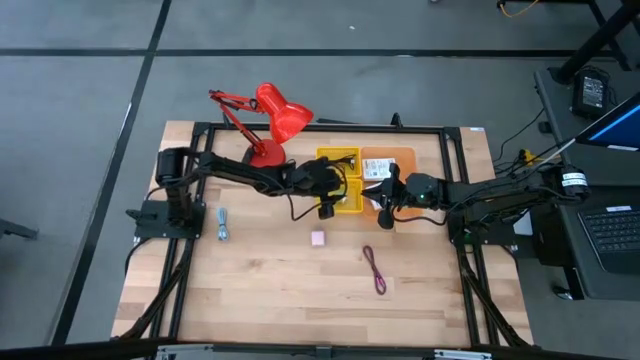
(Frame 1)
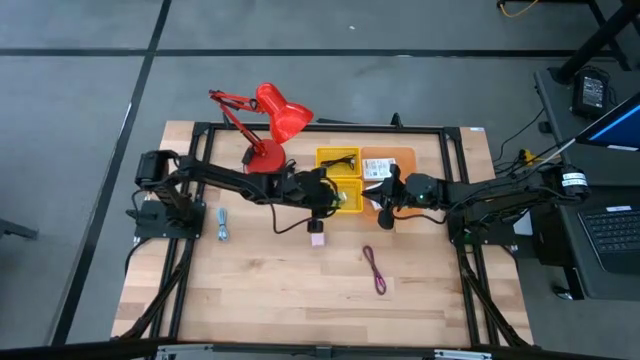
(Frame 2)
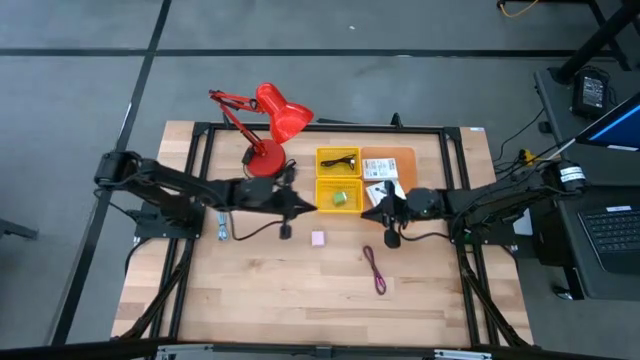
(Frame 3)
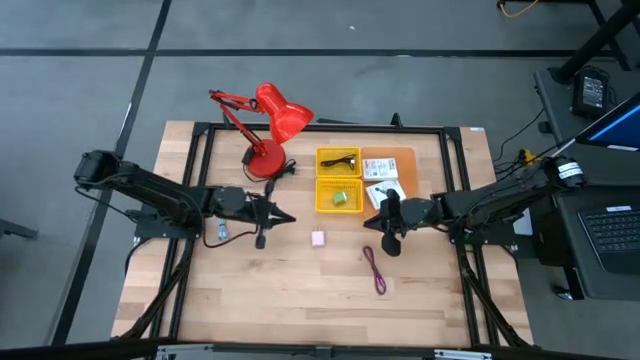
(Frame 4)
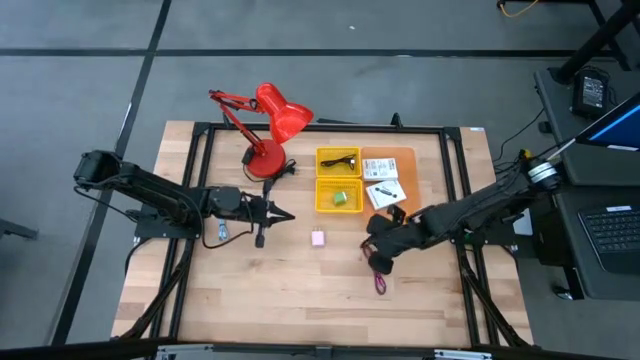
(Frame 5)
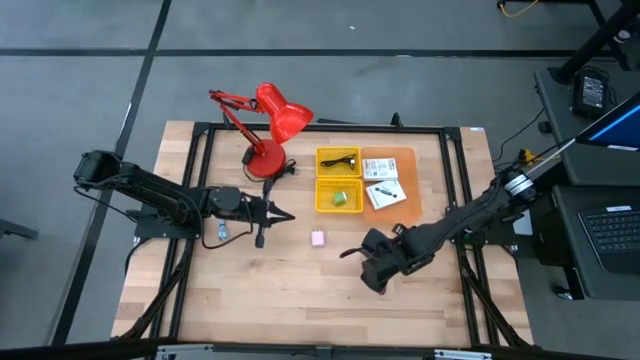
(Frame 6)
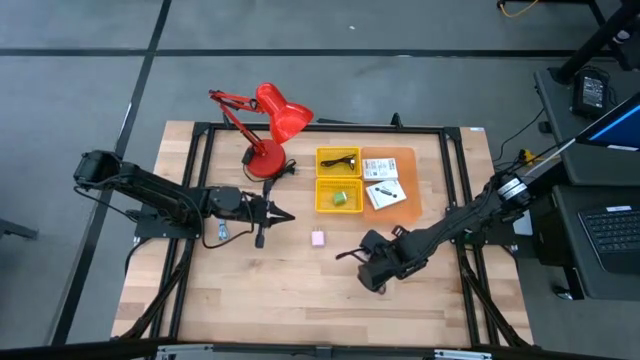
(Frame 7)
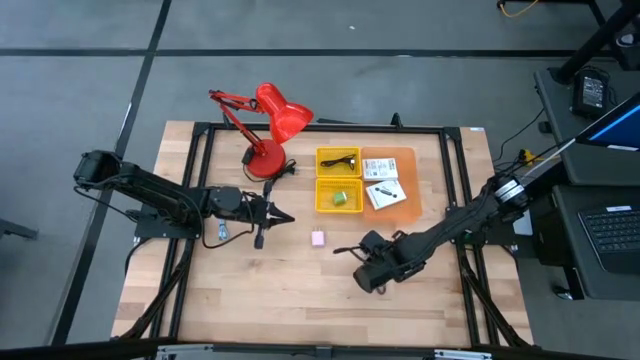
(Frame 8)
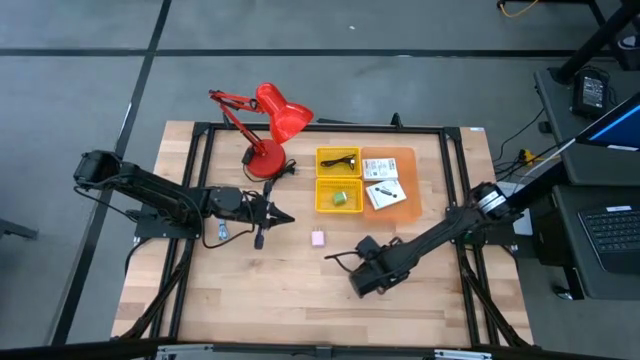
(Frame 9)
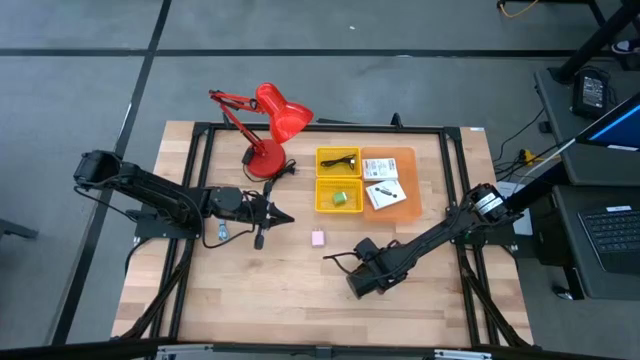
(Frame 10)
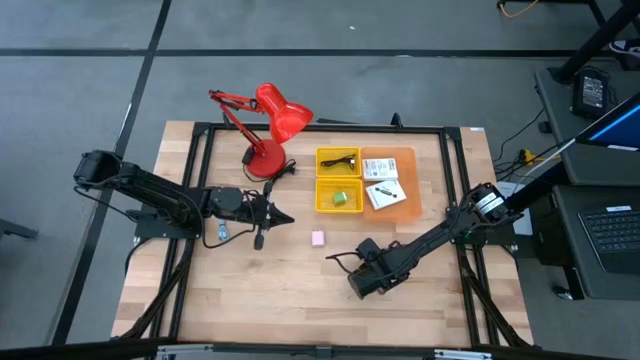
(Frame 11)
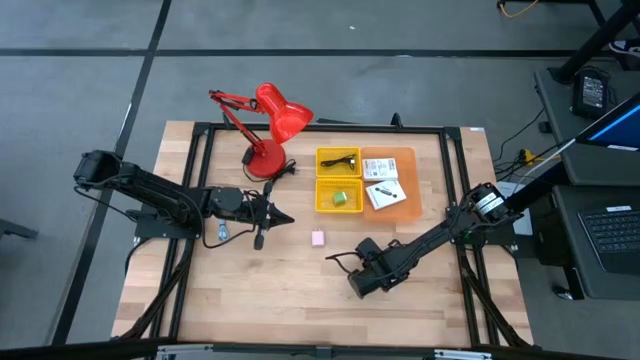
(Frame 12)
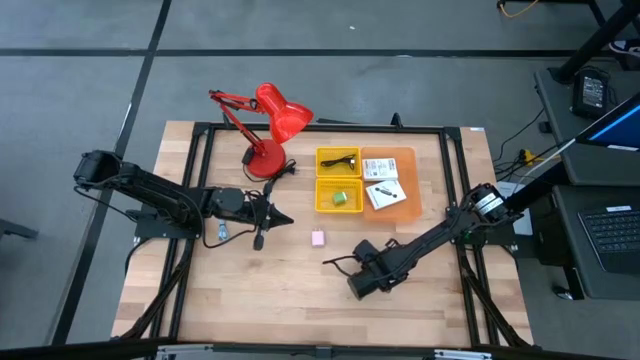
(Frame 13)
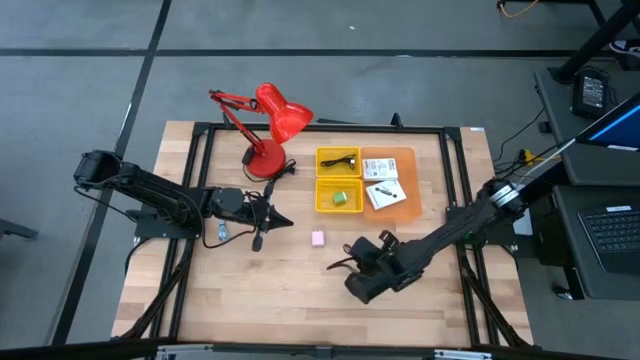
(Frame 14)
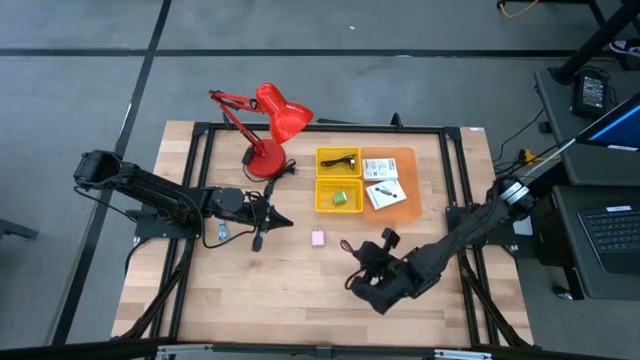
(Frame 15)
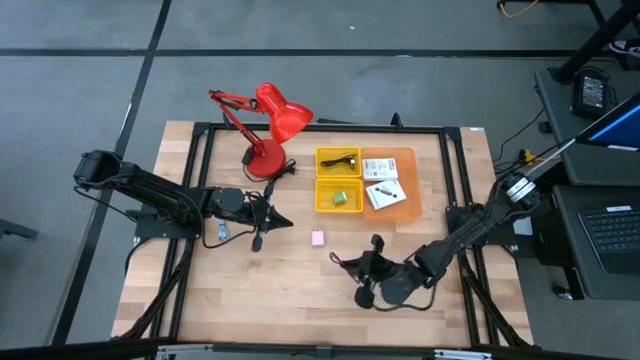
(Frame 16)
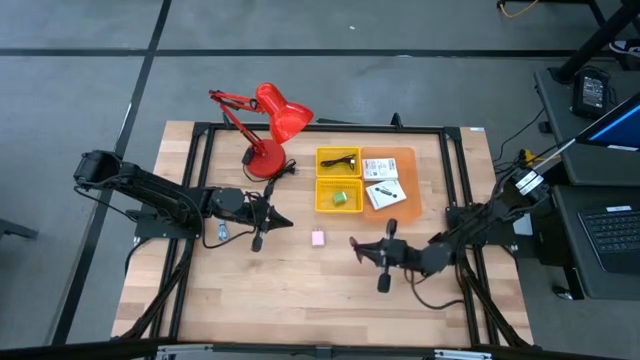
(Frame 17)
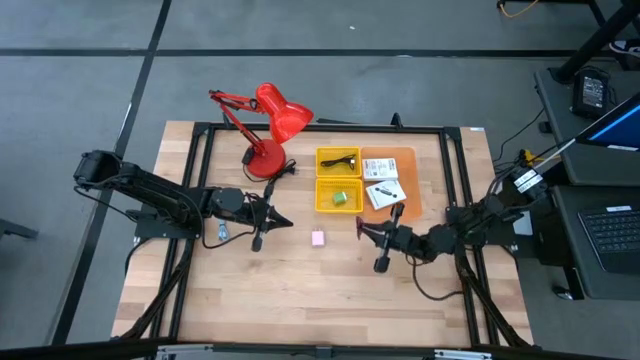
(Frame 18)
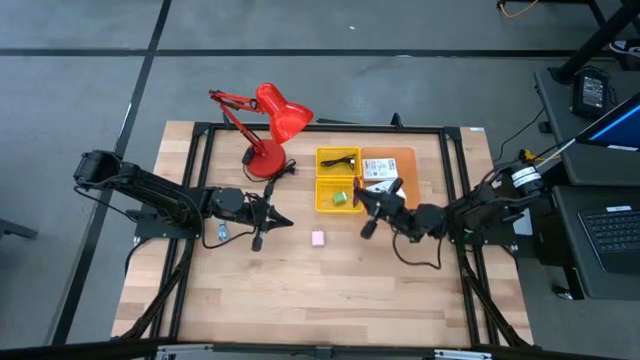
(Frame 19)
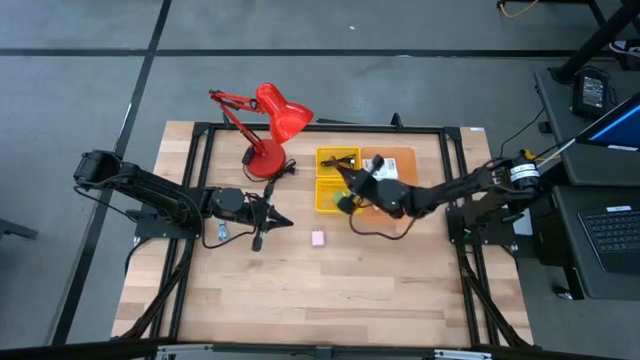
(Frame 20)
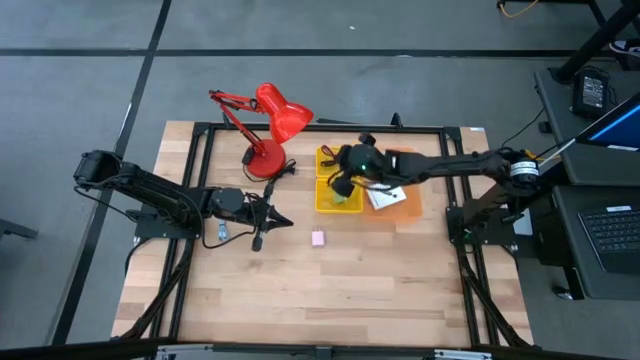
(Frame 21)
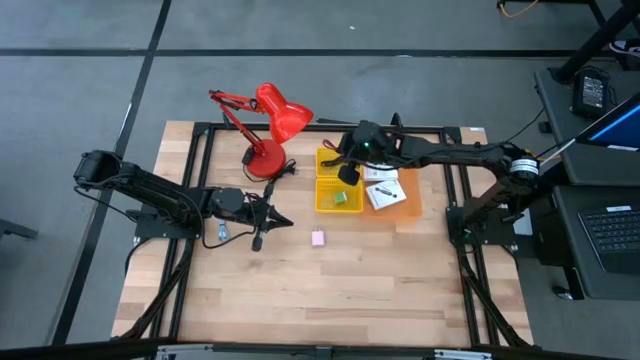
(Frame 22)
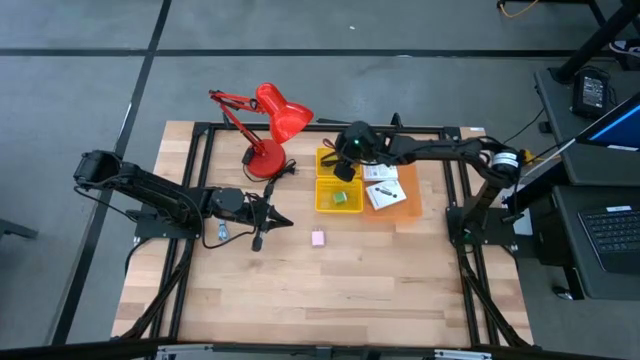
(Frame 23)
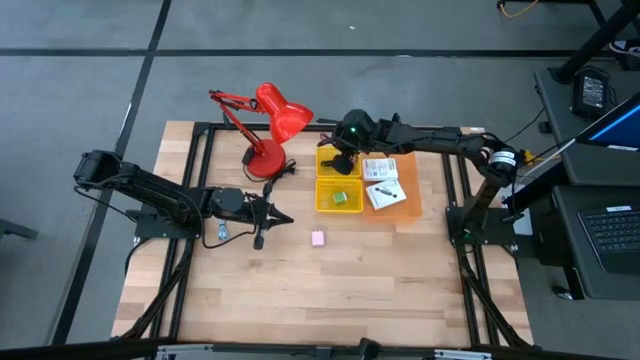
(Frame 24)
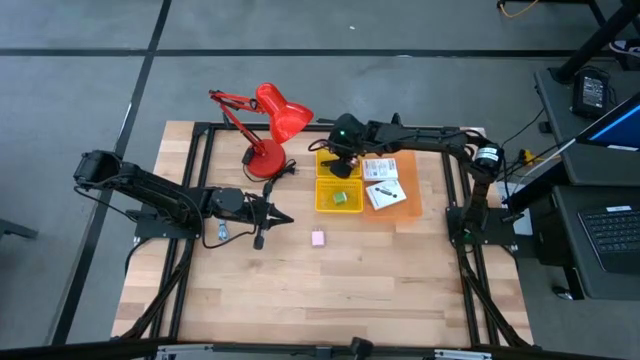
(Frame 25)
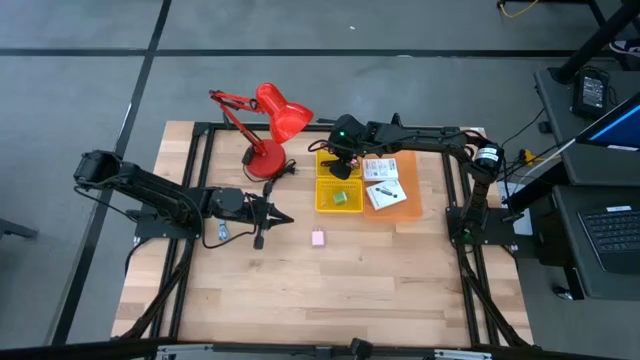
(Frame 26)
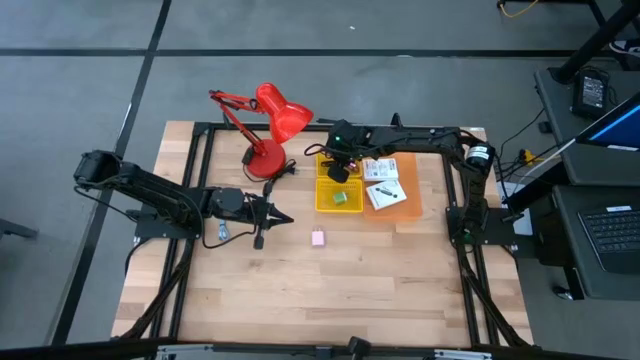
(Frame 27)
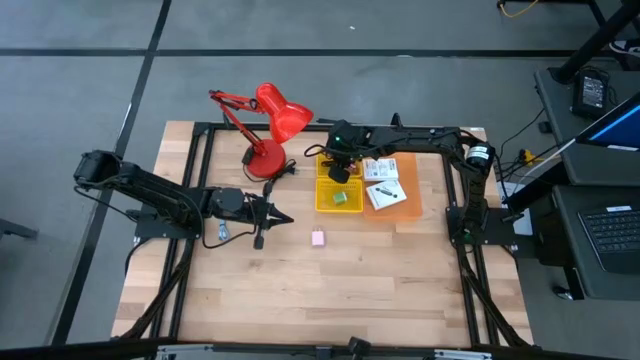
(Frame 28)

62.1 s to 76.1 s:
Task: Pick and place items into bin
Put the pink charger cable into the top yellow bin

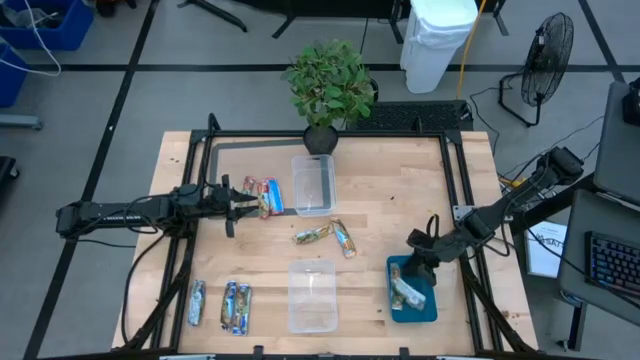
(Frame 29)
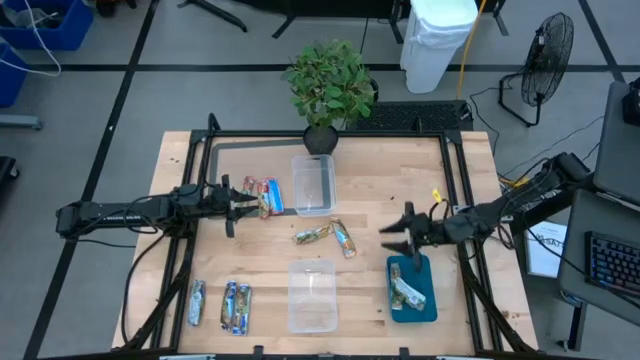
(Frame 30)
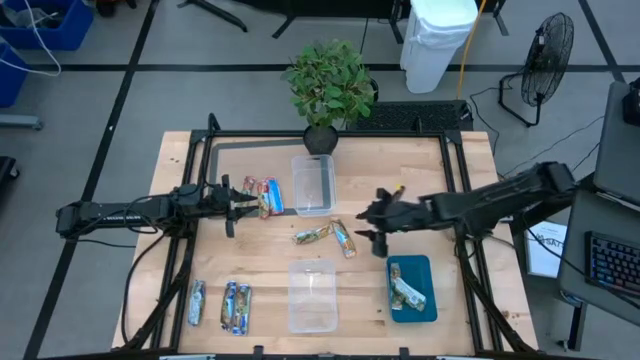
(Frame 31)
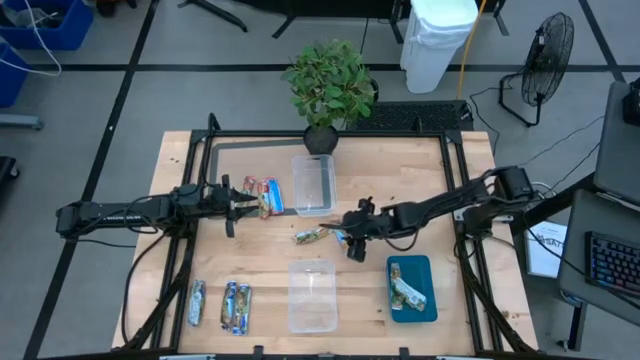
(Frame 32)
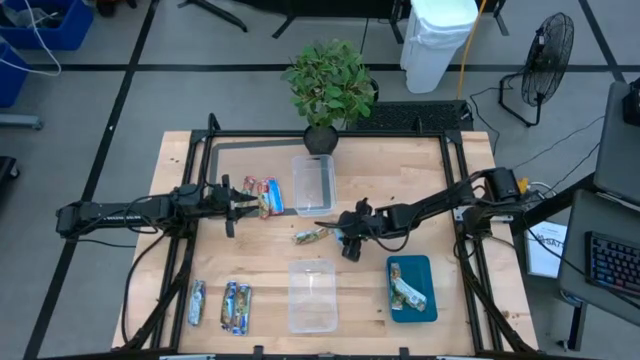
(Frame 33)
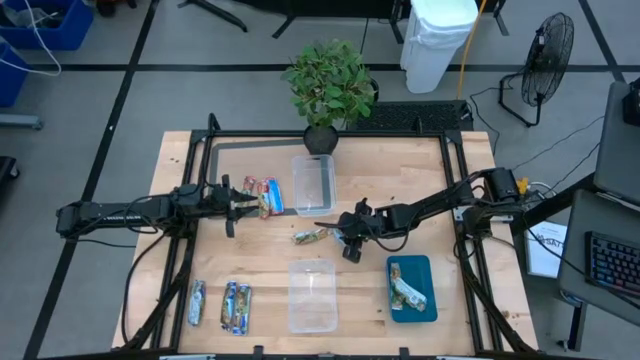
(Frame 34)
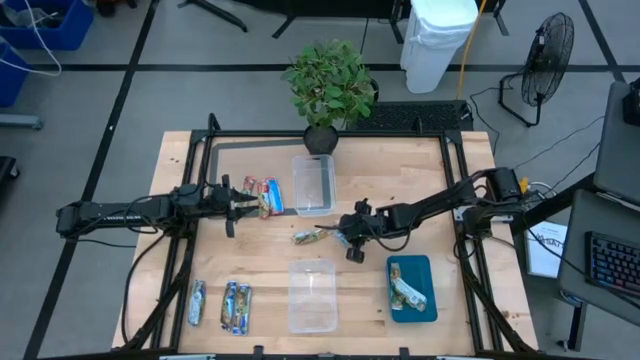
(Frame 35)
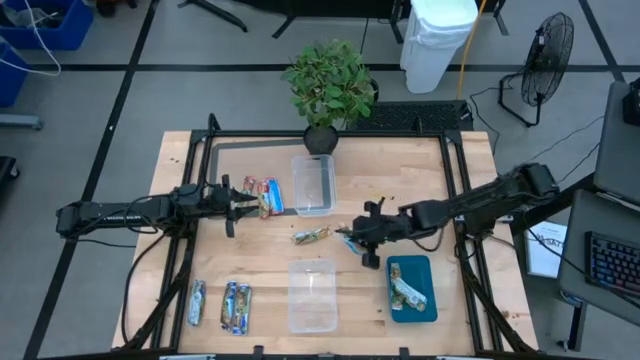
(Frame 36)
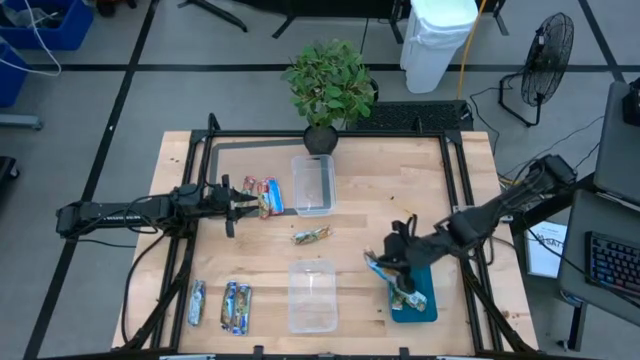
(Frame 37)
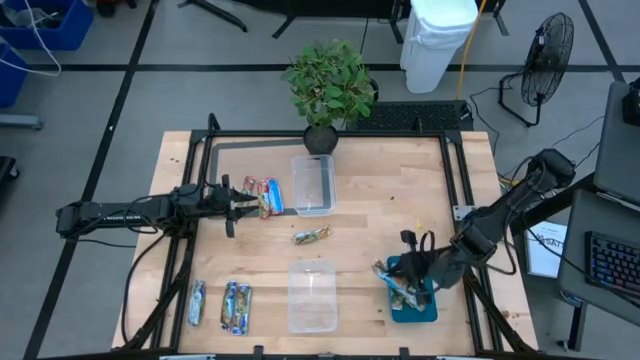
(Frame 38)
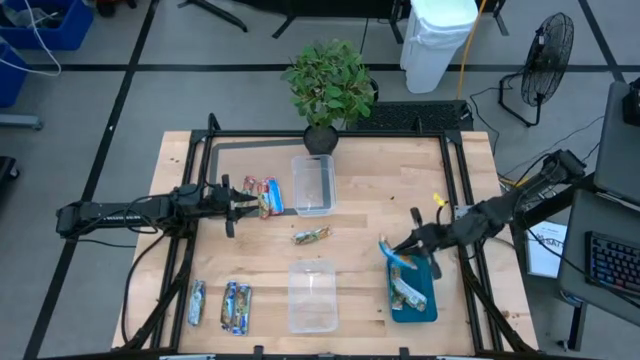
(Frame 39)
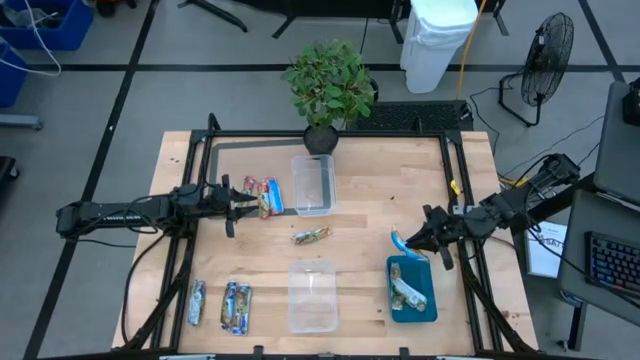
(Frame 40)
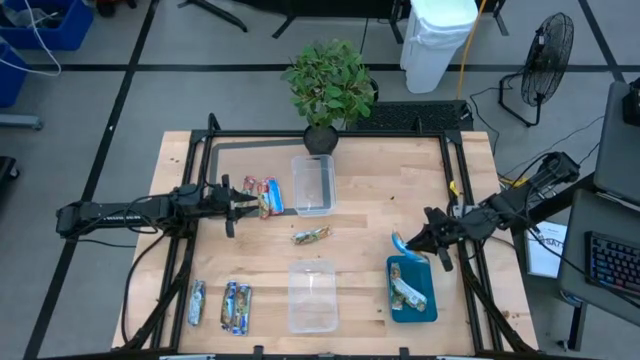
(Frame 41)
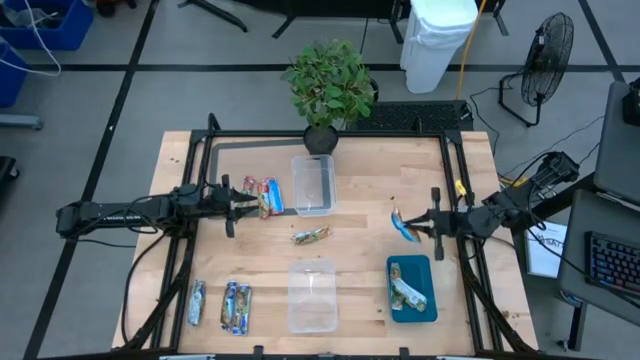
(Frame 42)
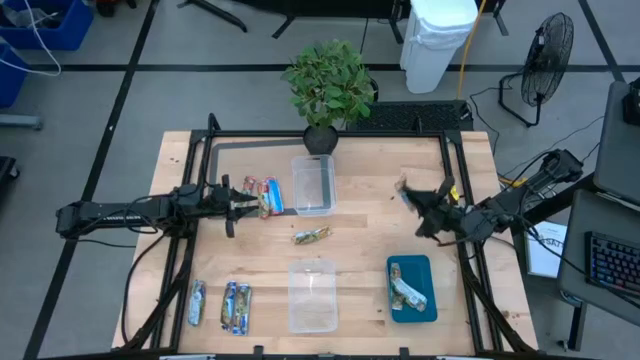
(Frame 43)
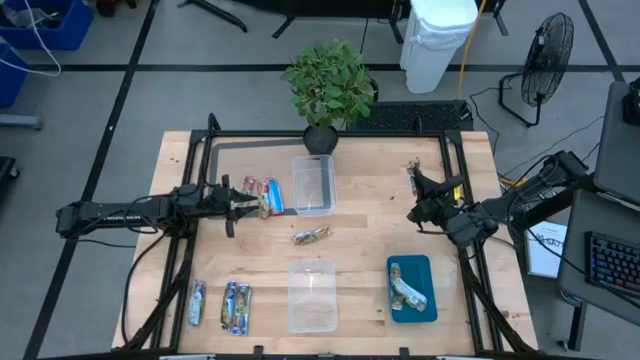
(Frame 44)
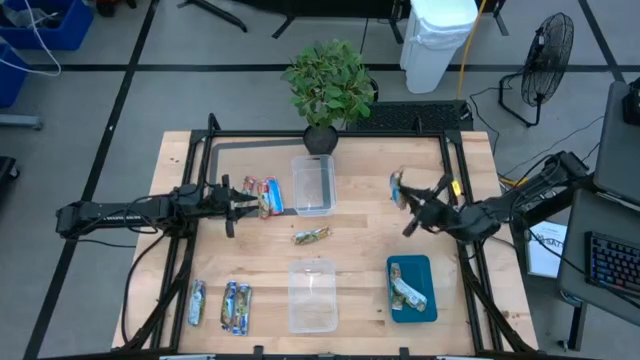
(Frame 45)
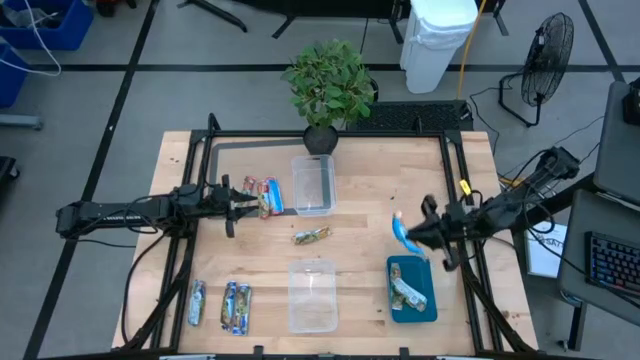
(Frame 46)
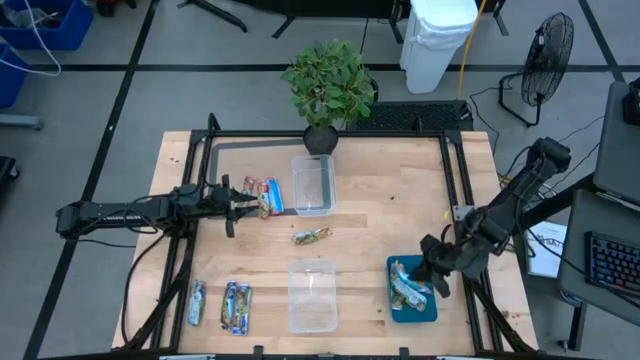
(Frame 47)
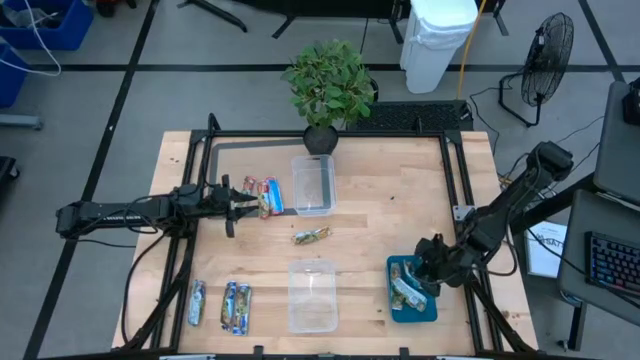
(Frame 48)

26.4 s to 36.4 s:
Task: Pick and place Granola Bars by type
Put the yellow granola bar into the blue bin
